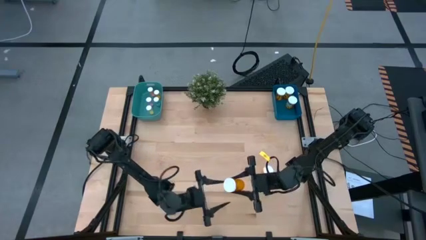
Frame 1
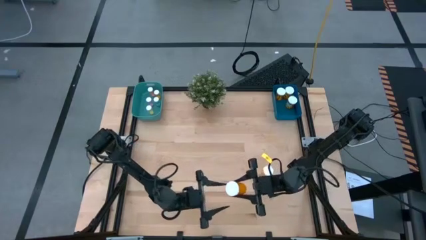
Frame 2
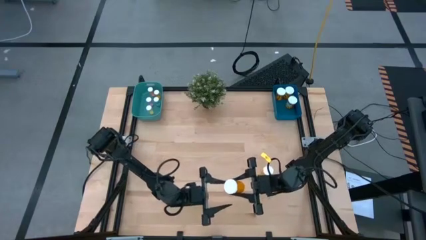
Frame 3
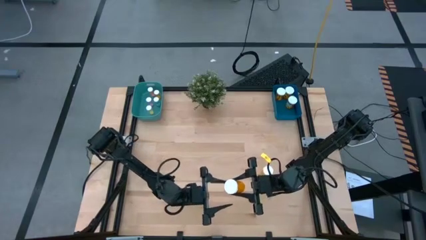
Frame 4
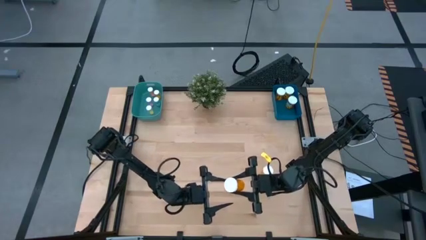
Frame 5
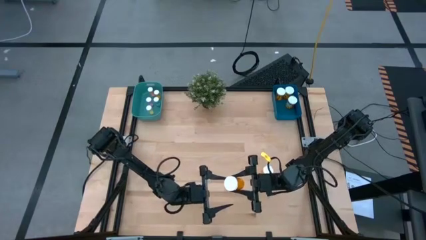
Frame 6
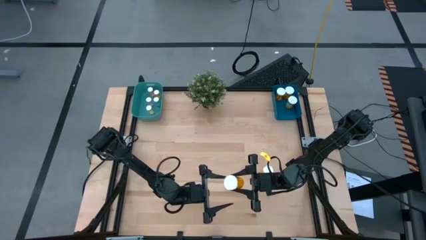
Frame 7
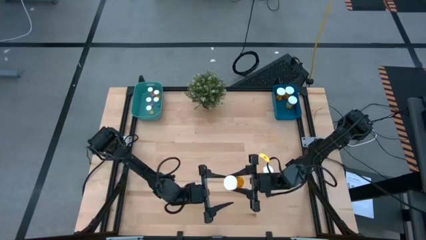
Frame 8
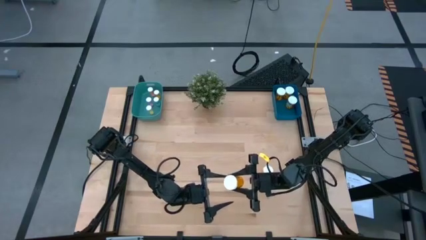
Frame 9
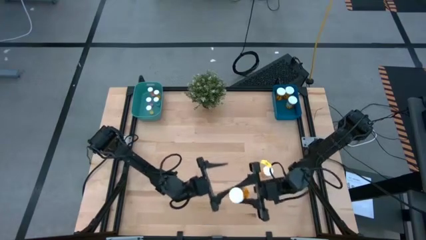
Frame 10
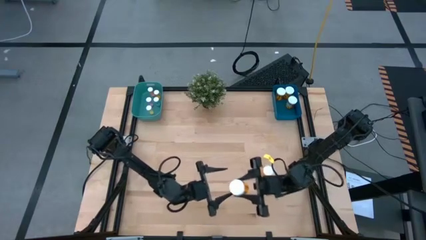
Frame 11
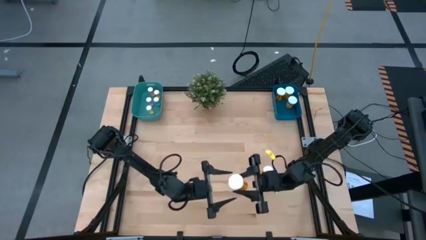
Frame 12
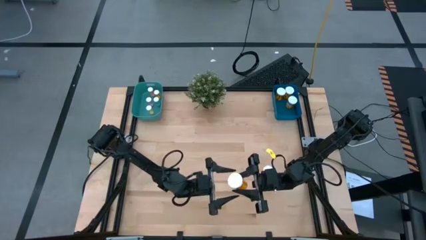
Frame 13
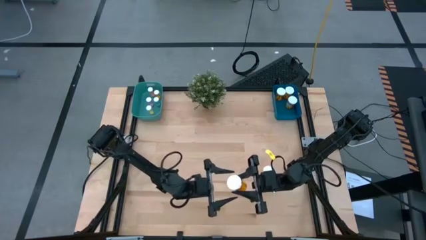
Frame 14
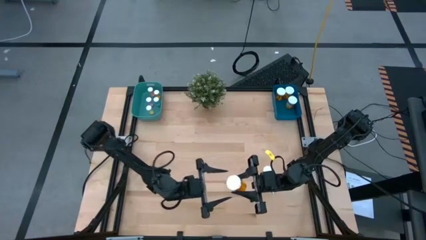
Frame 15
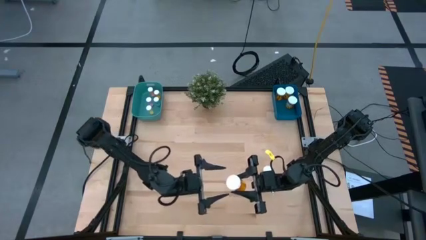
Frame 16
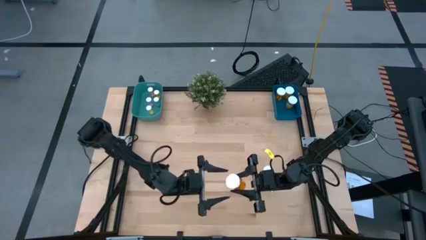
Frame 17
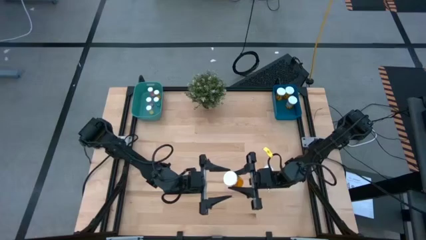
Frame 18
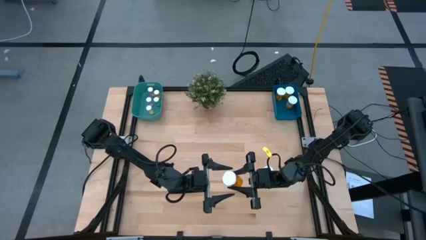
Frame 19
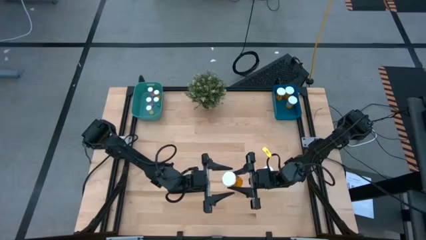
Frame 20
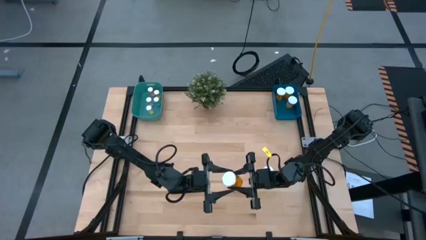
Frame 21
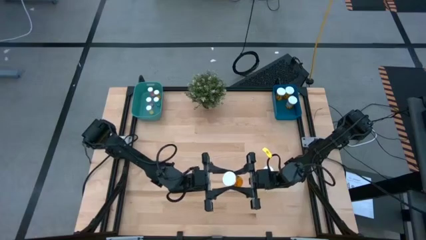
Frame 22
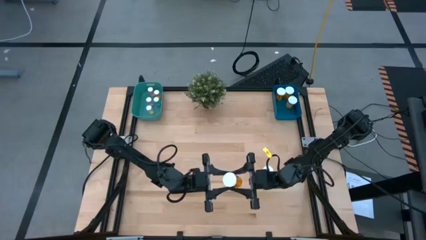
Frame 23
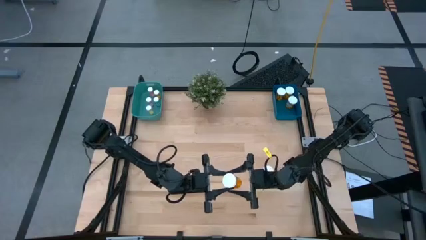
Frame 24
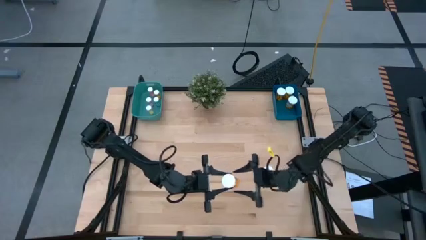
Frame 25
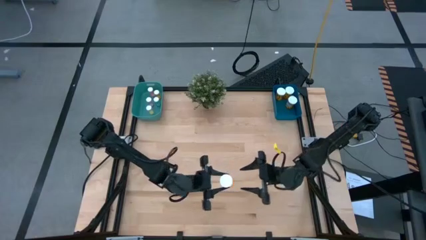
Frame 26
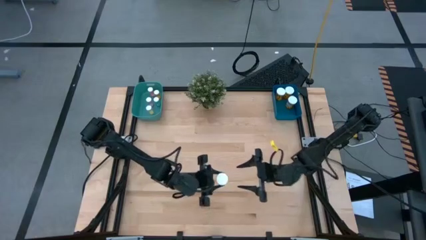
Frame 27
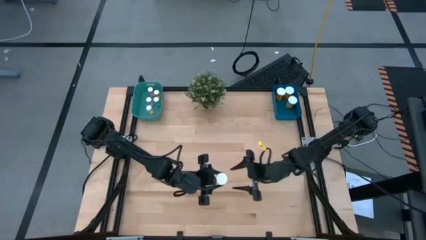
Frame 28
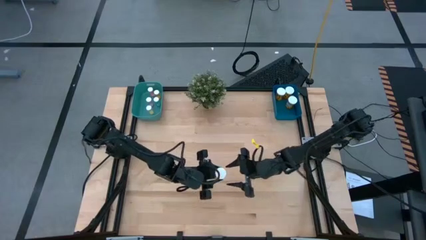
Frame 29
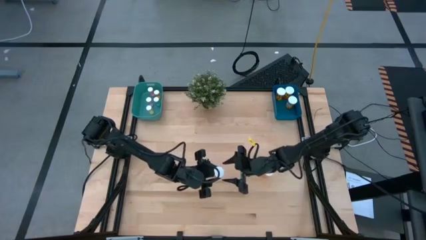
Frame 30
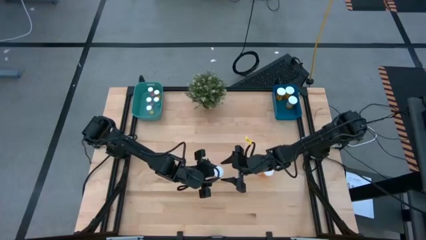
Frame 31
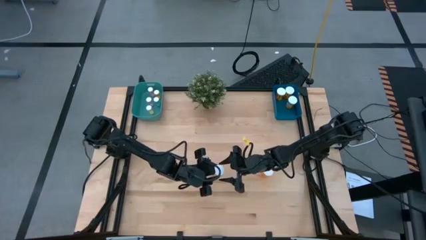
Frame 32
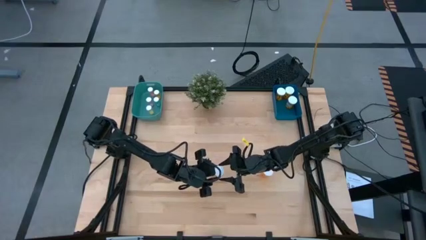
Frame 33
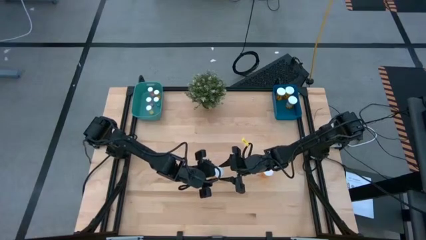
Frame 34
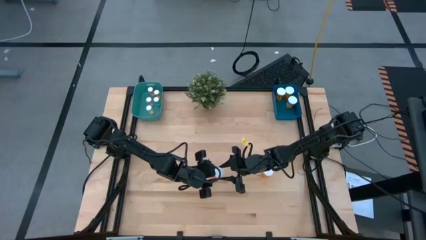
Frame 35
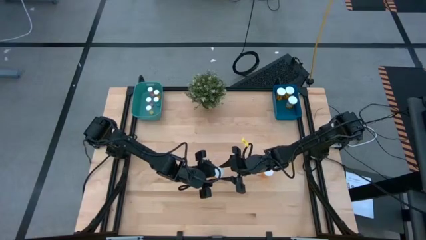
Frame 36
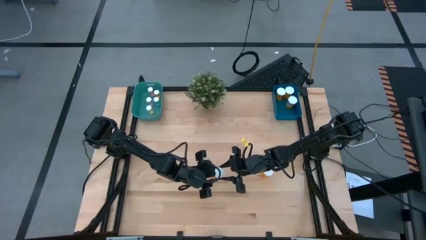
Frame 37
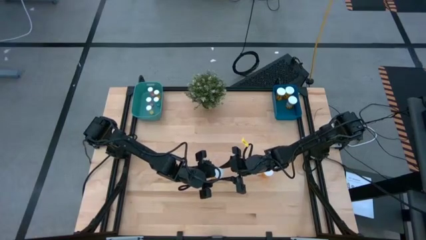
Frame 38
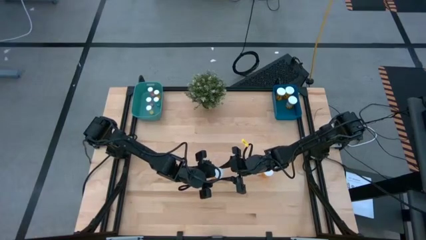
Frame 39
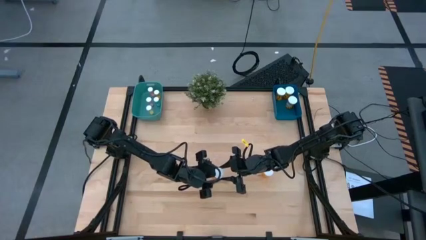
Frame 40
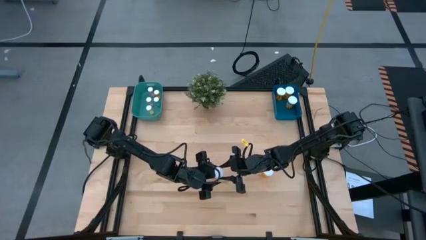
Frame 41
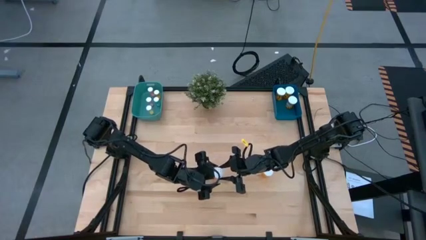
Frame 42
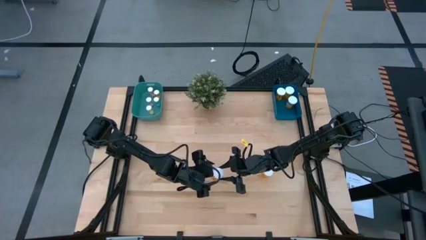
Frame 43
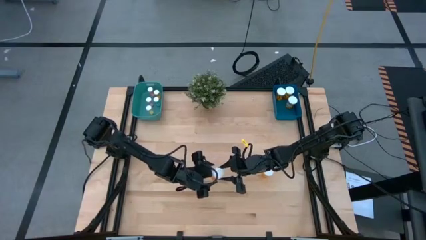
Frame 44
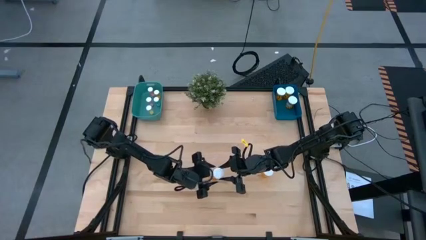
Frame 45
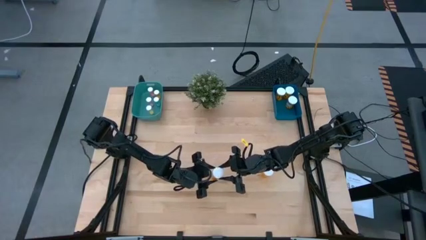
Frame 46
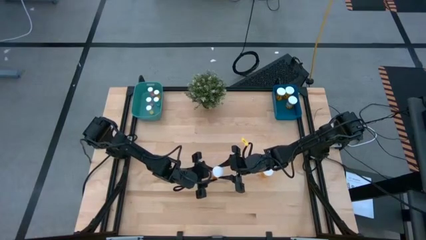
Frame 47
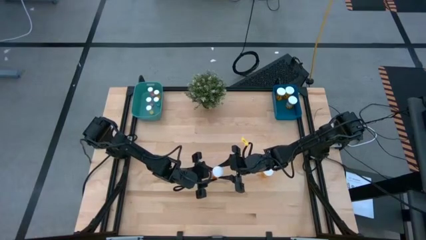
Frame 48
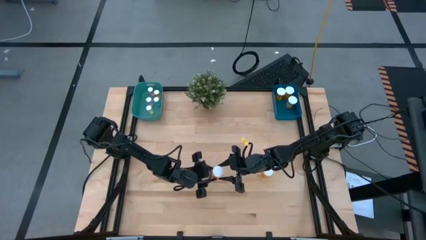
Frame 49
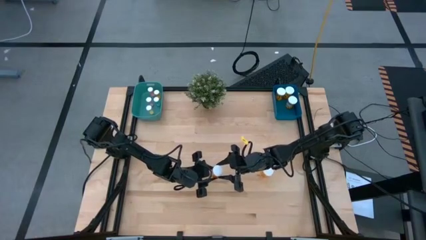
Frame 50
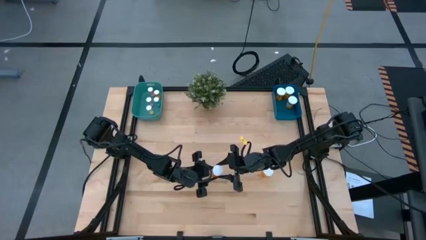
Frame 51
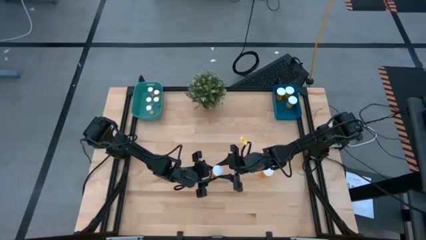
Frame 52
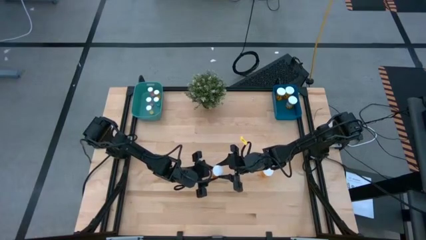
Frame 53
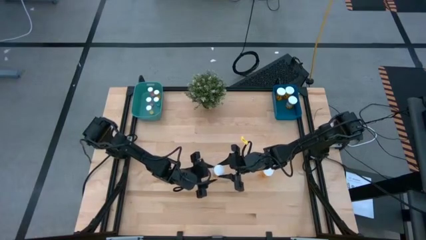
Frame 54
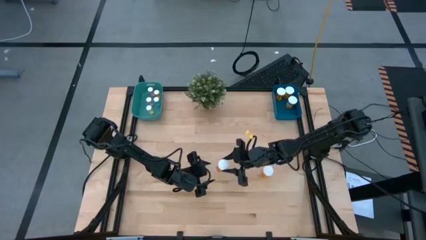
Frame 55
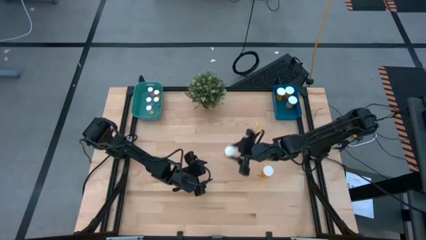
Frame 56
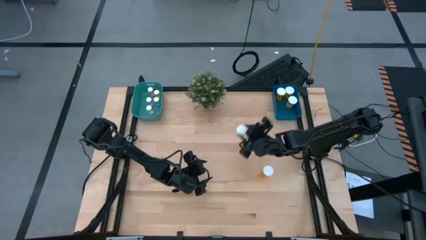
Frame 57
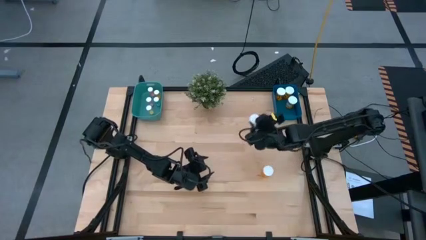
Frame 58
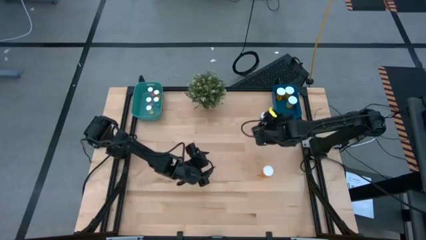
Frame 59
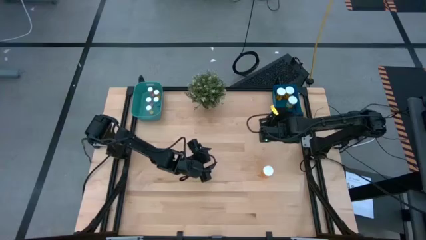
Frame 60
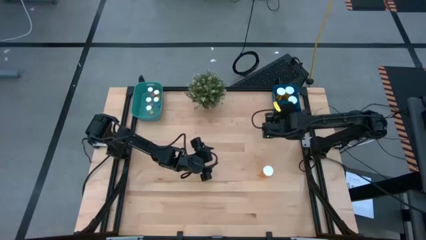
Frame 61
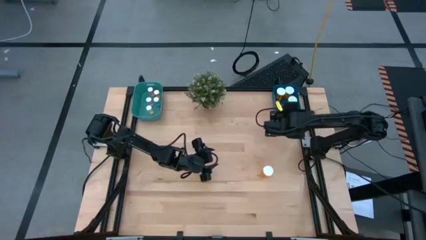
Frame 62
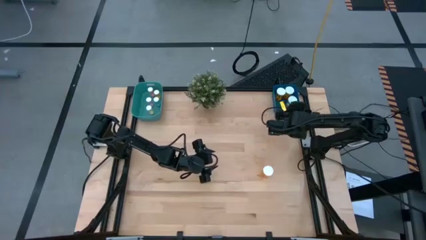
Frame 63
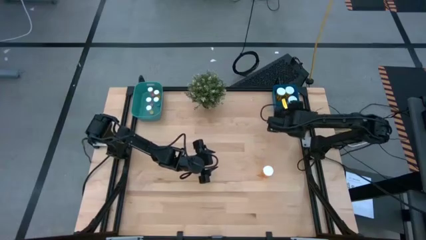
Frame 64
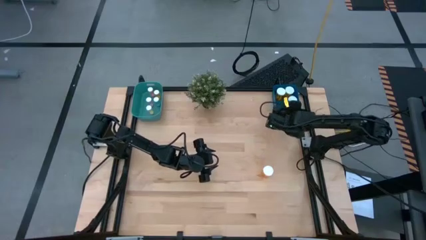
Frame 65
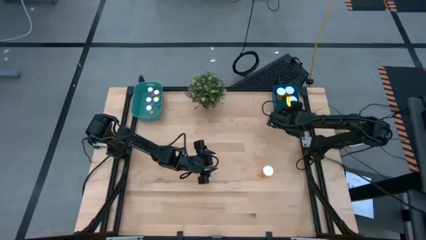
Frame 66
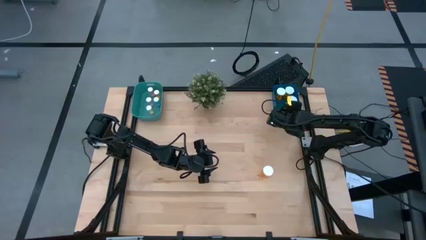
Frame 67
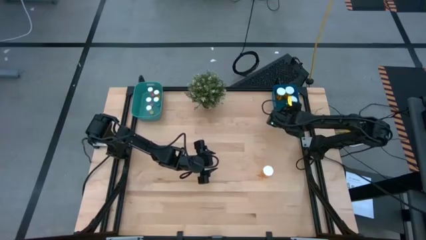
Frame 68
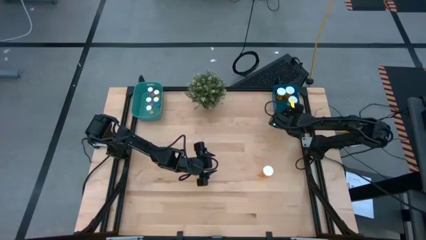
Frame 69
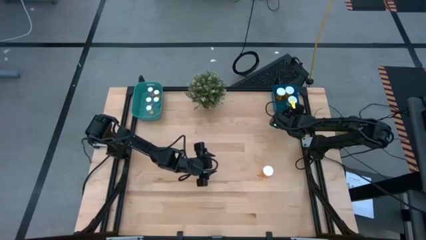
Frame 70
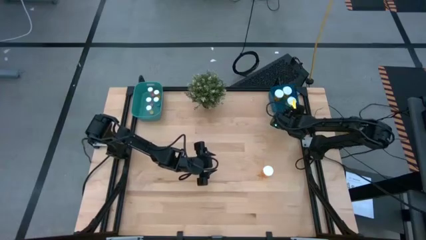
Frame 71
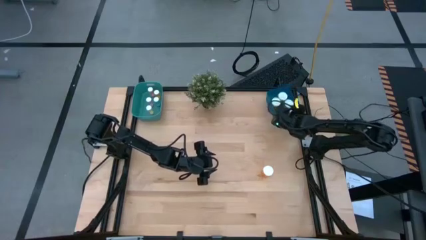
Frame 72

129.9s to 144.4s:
Task: Pick and place medicine bottles into bin by pill shape (circle, oval)
Put the big orange pill bottle into the blue bin
